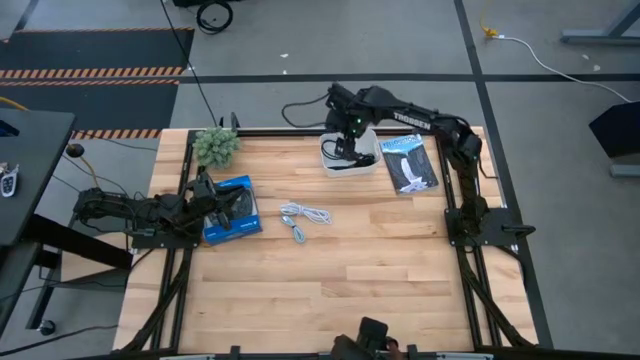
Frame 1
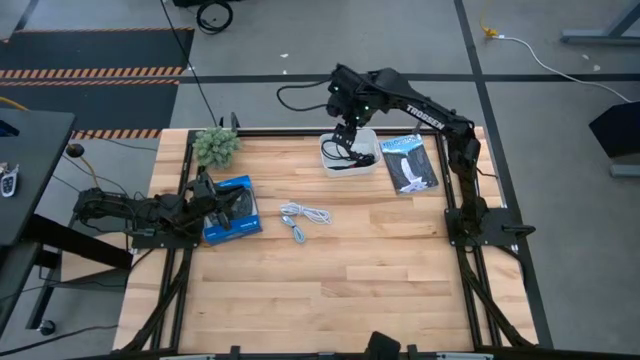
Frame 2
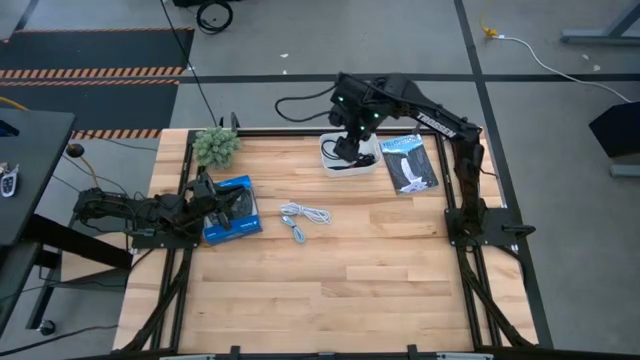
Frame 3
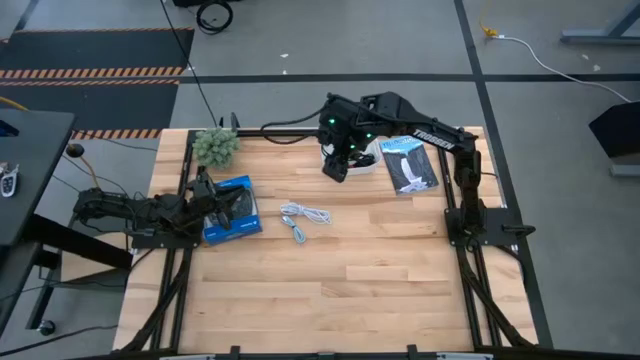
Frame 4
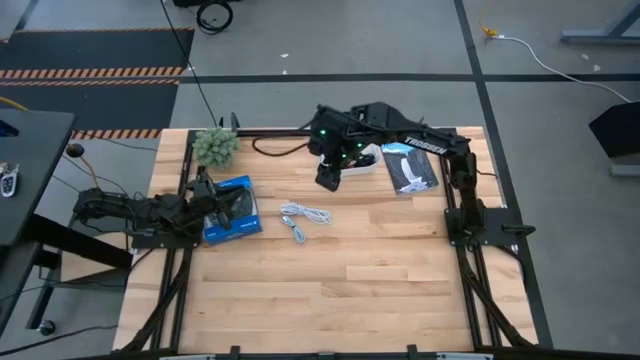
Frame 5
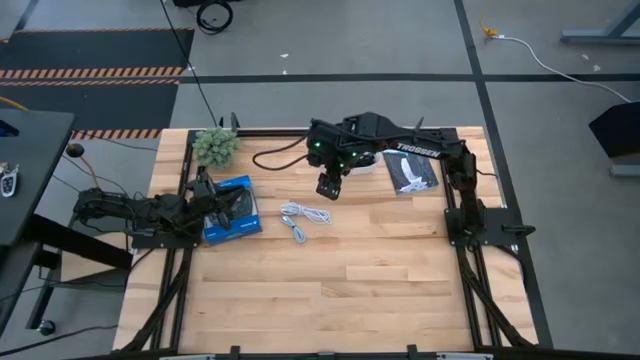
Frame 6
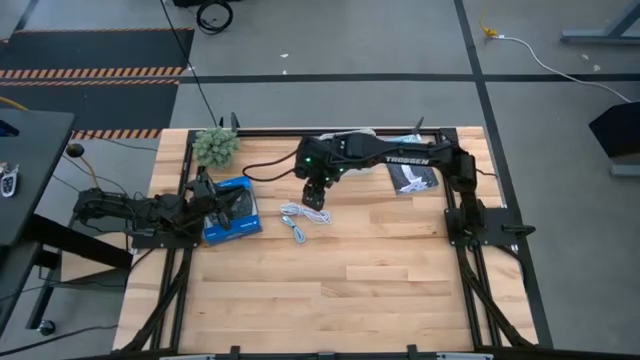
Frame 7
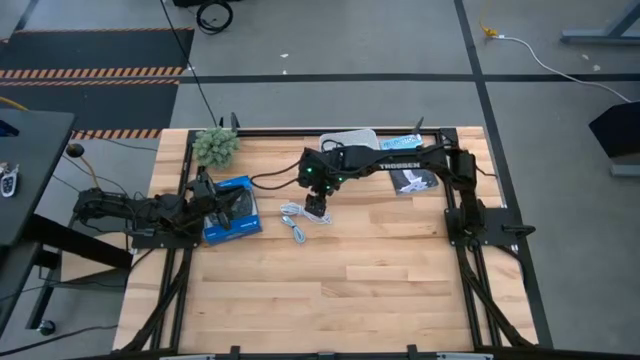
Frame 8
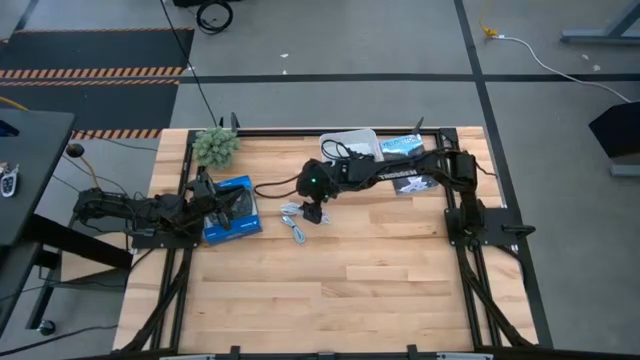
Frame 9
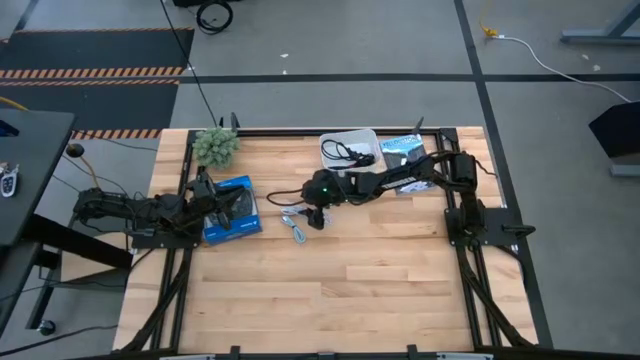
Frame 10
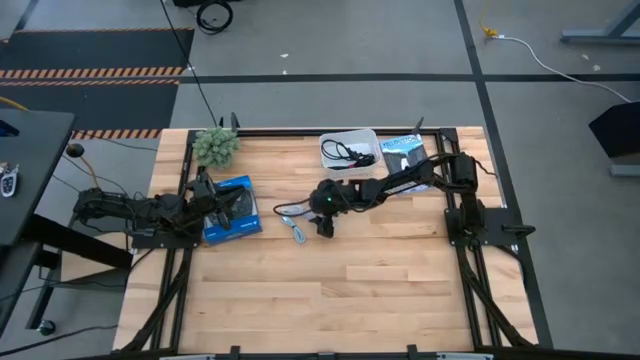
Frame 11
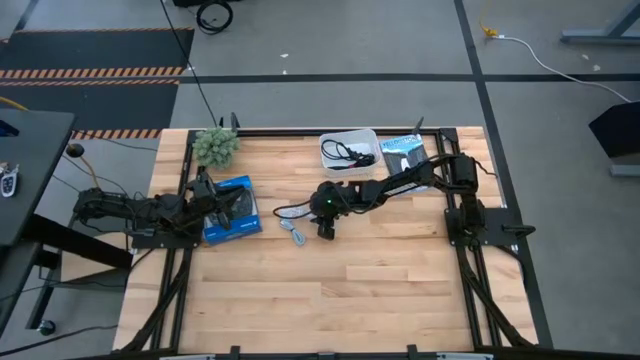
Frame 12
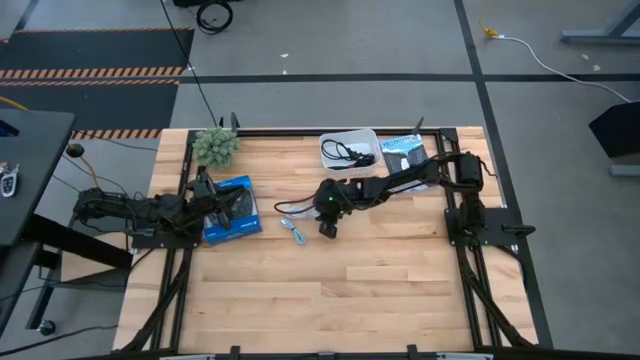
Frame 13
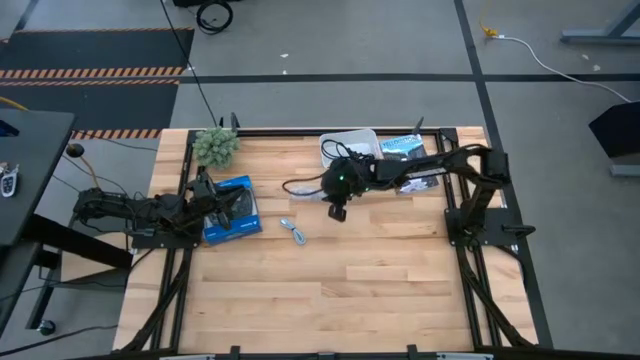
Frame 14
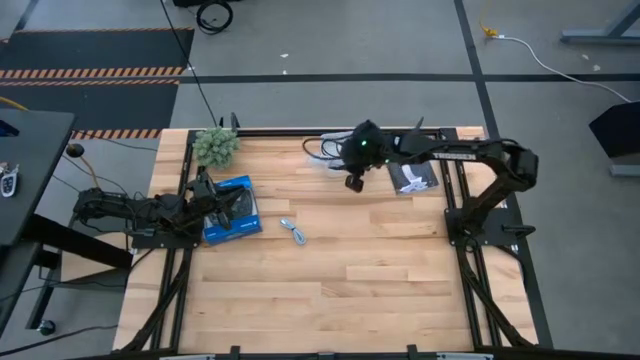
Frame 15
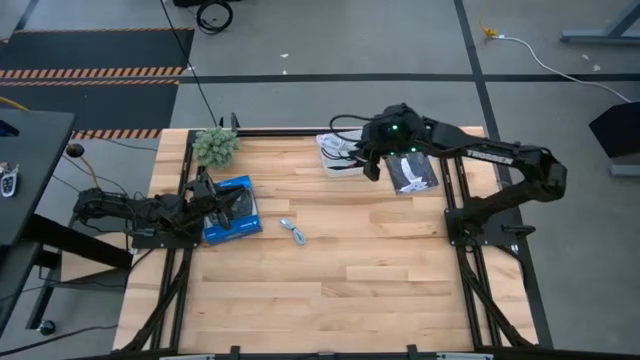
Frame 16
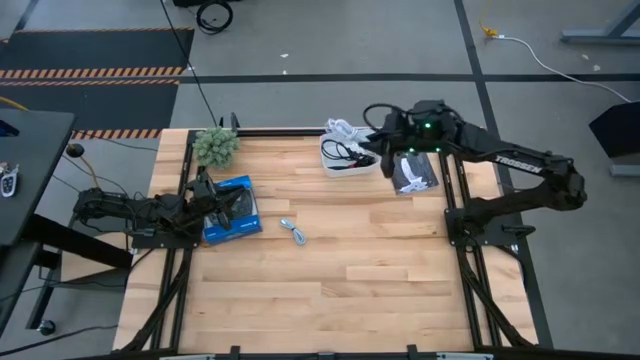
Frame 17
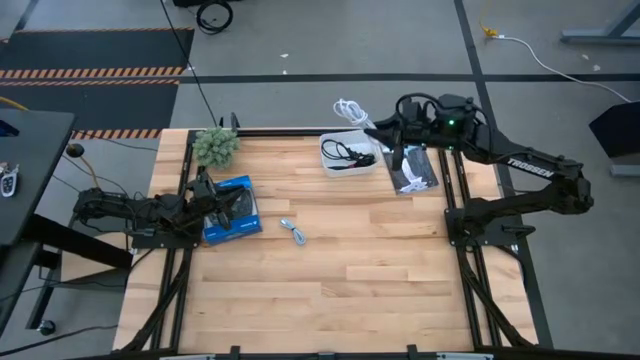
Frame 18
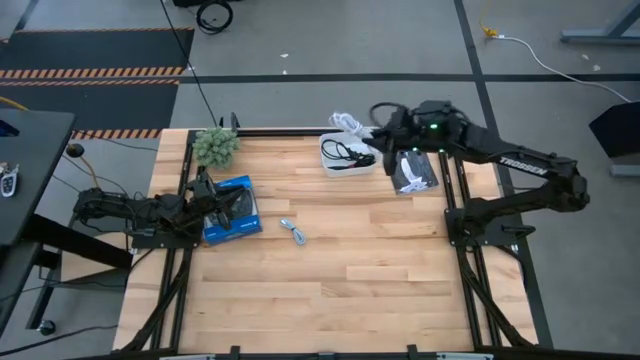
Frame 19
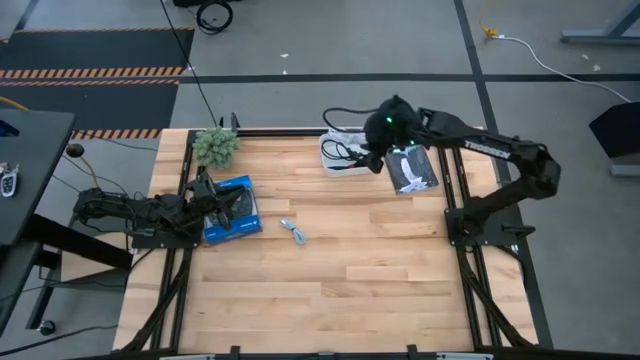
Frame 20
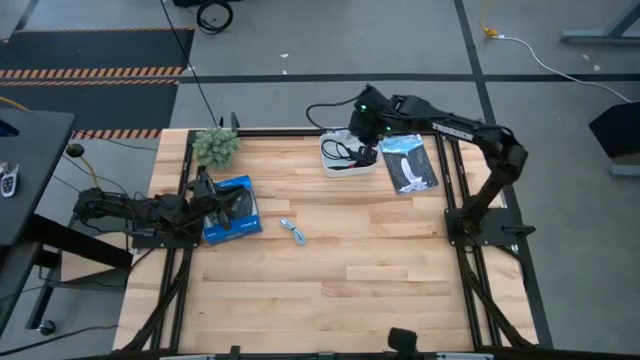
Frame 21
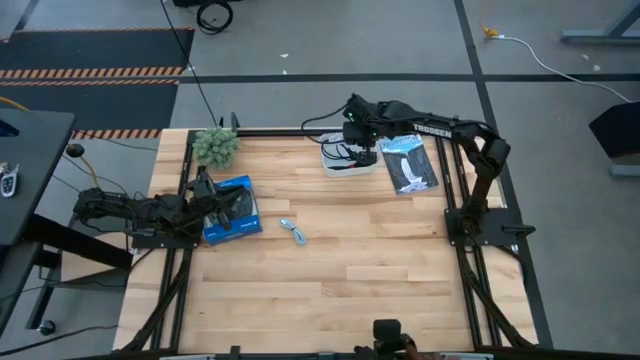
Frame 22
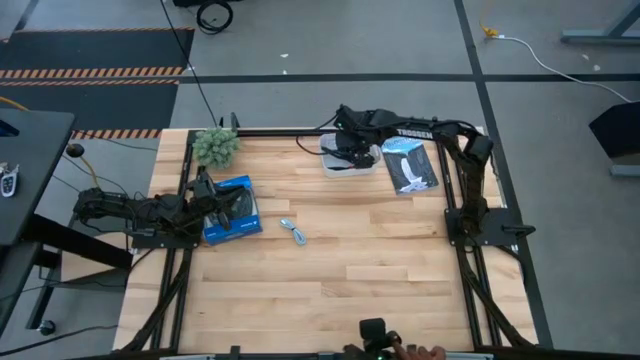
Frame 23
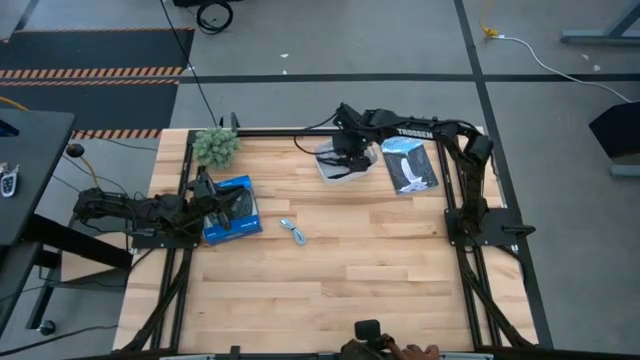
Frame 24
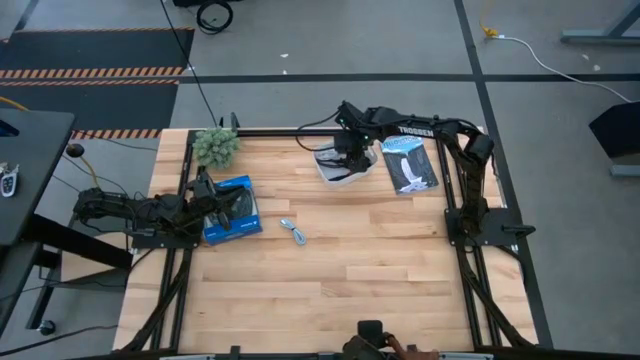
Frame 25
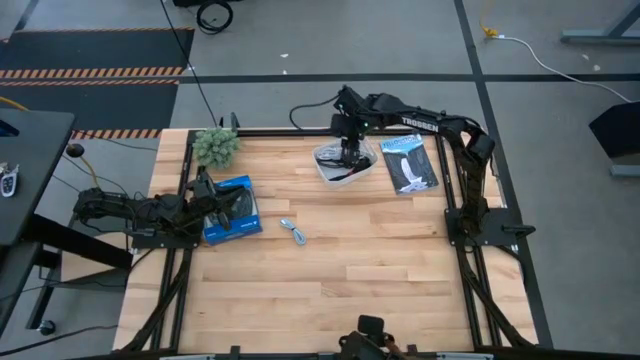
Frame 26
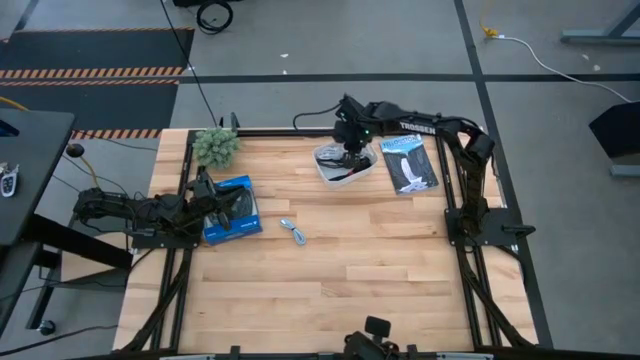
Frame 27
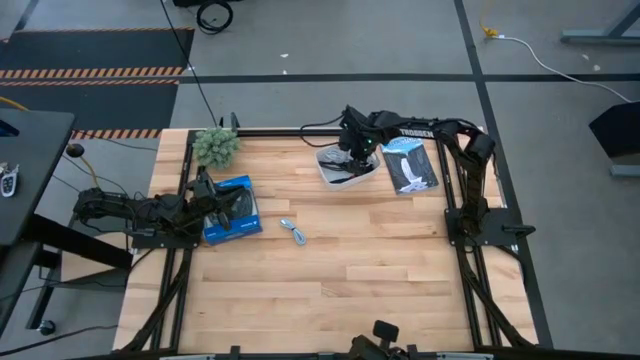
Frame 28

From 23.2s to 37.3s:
Task: Pick and place USB-C Cables
Put the white USB cable into the white bin

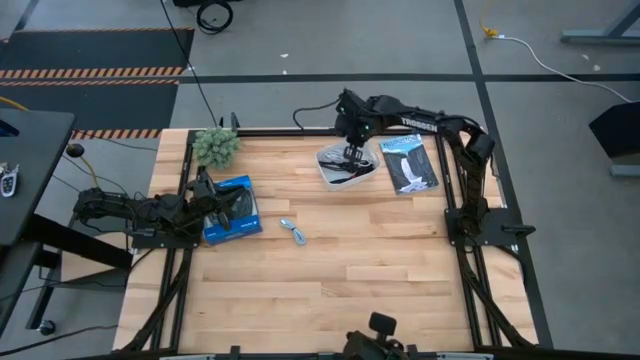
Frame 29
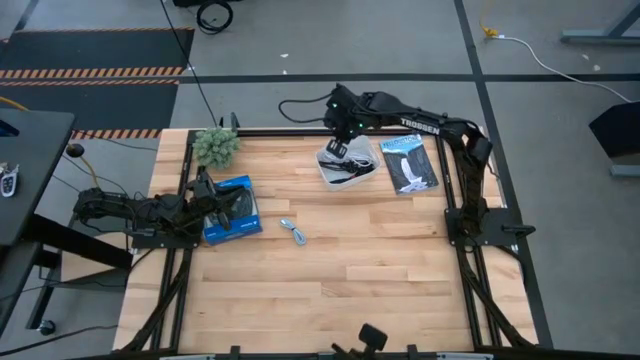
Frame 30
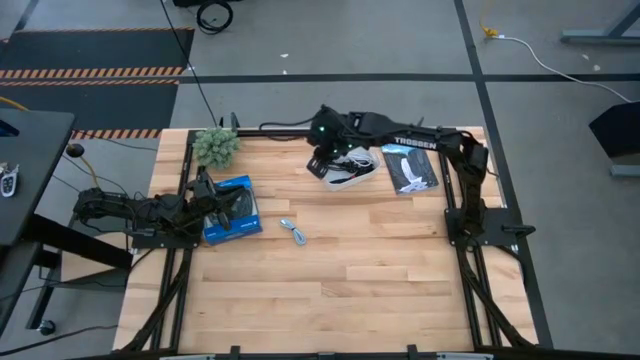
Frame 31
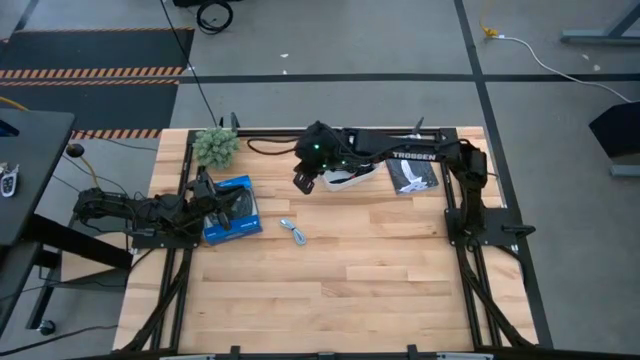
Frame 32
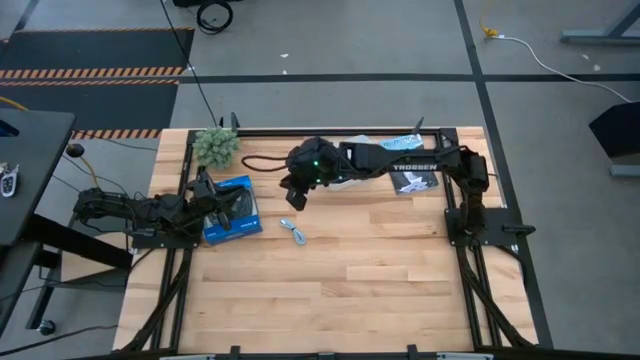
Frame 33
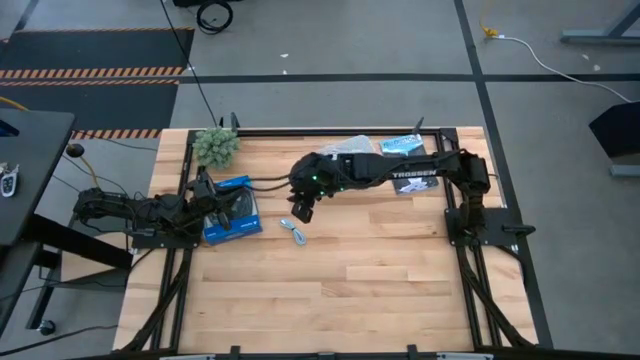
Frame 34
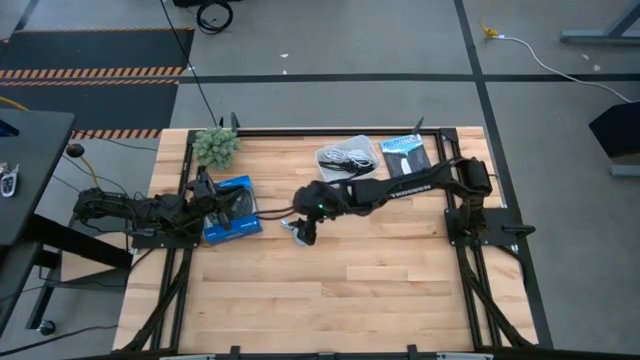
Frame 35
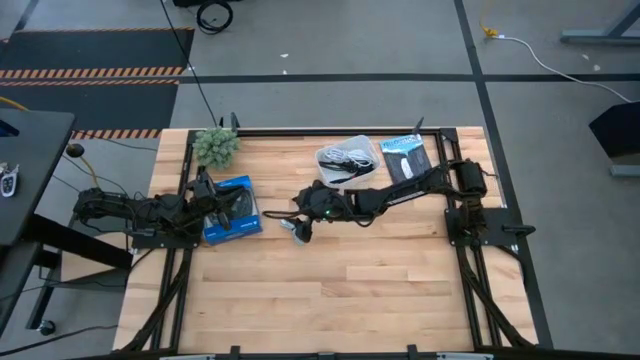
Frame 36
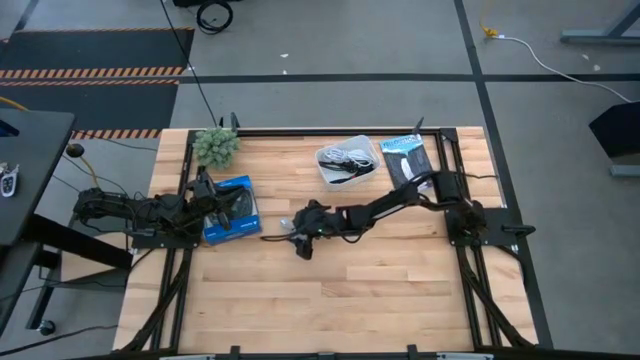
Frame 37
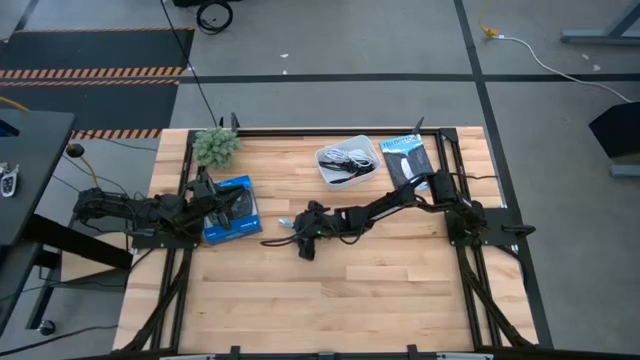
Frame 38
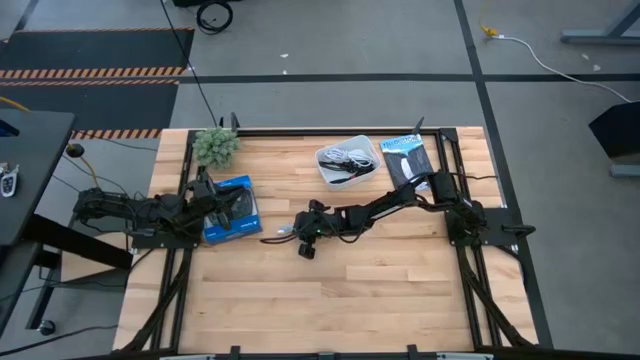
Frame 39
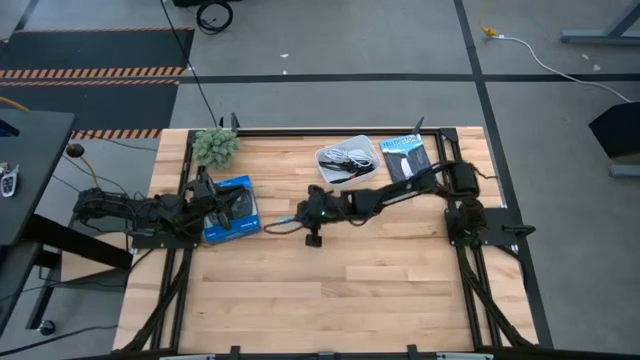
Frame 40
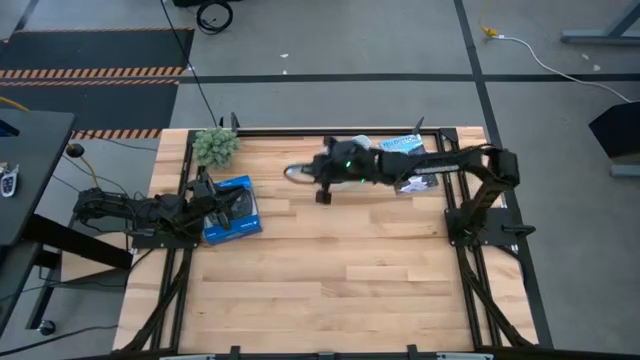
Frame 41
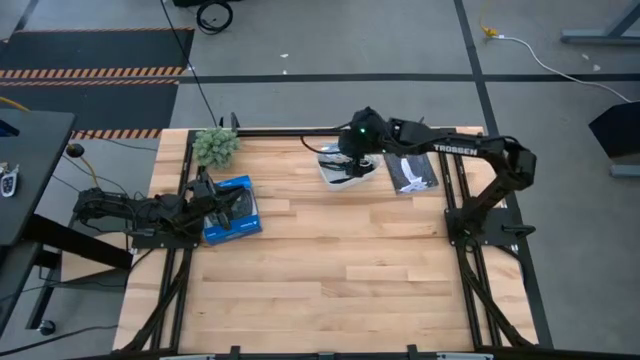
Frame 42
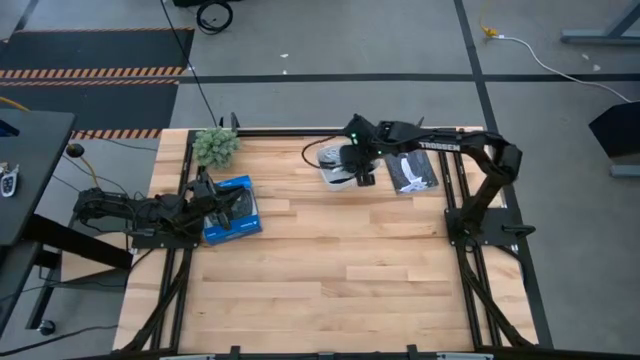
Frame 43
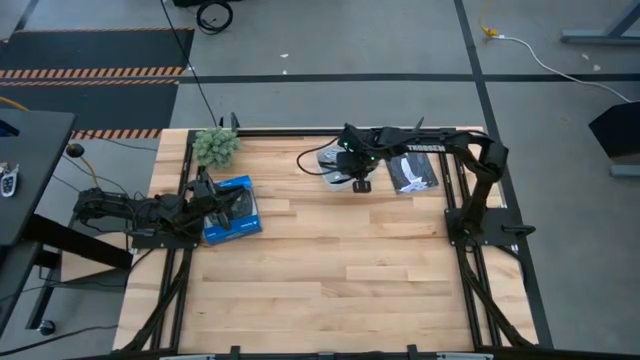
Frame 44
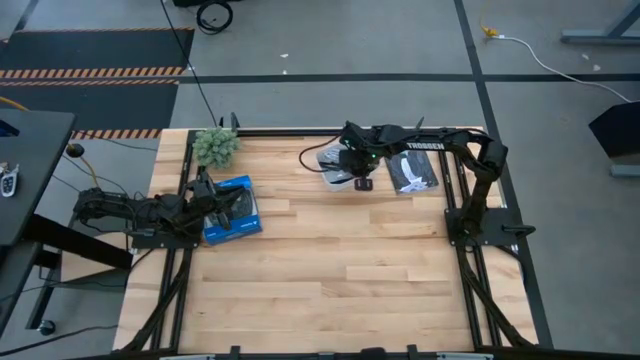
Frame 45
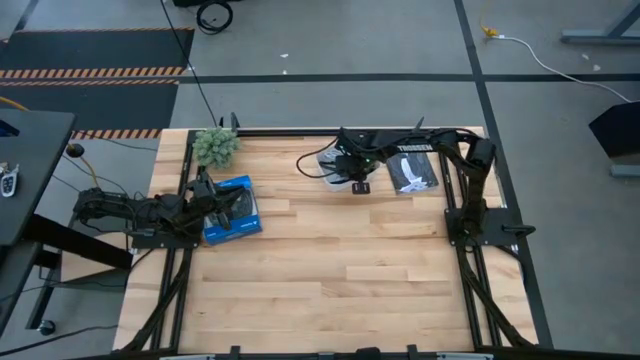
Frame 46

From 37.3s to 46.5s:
Put the light blue USB cable into the white bin
